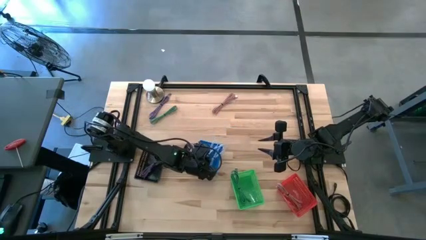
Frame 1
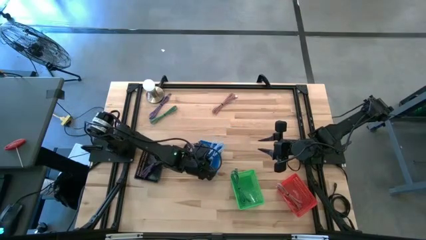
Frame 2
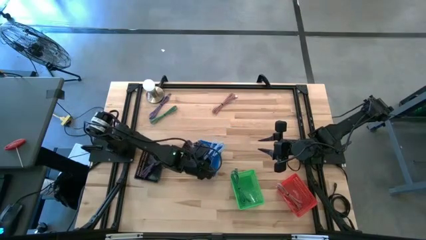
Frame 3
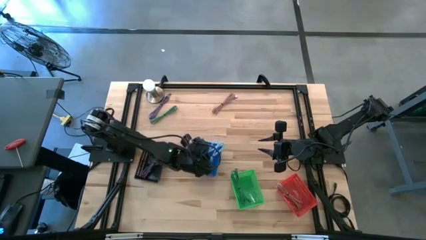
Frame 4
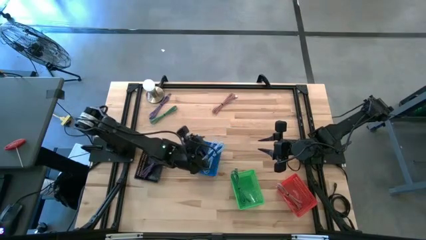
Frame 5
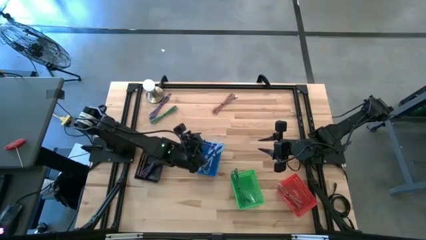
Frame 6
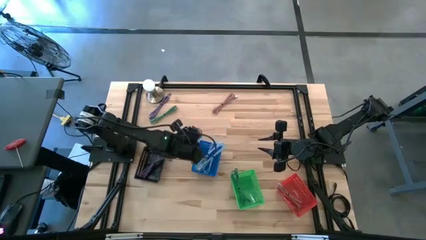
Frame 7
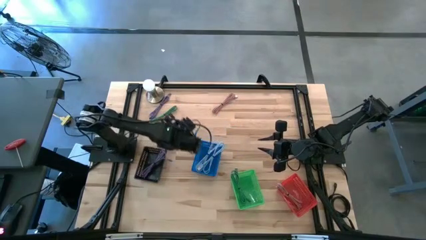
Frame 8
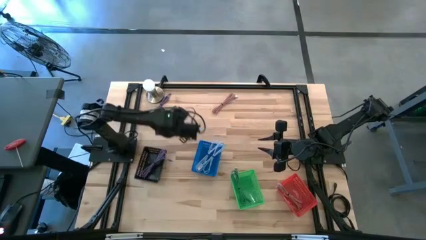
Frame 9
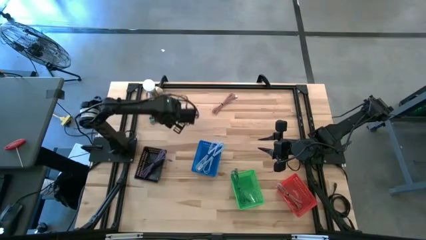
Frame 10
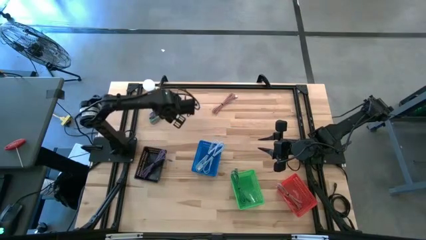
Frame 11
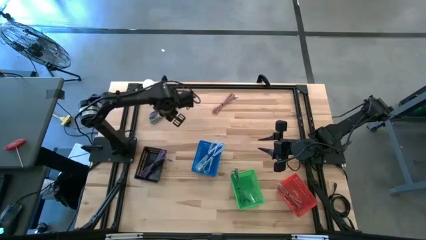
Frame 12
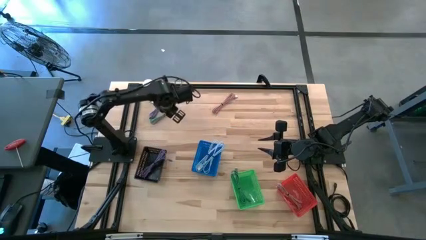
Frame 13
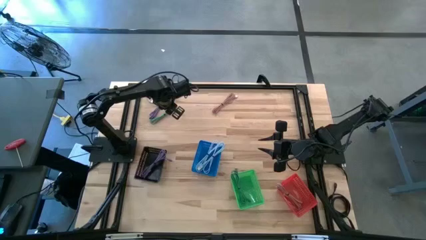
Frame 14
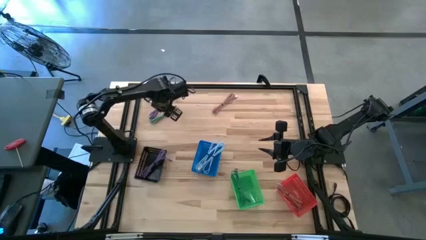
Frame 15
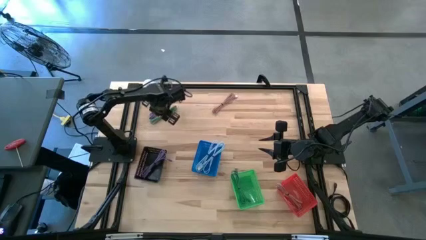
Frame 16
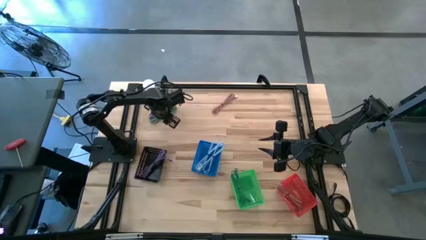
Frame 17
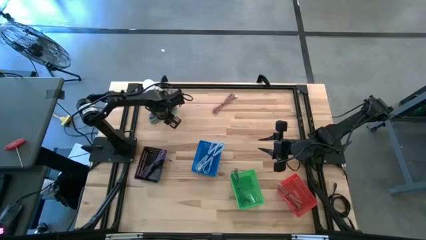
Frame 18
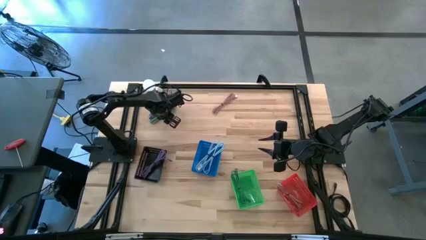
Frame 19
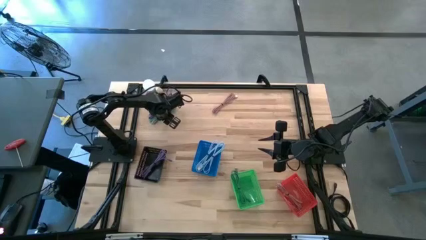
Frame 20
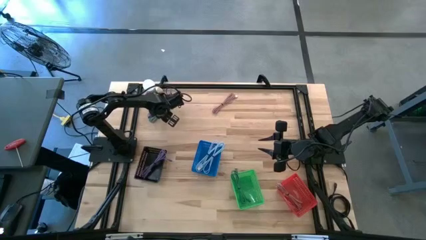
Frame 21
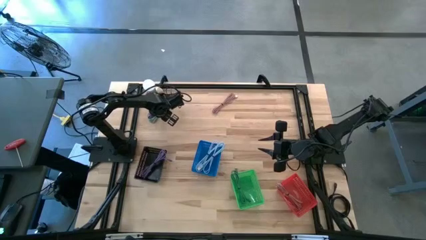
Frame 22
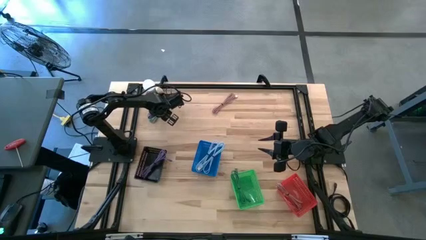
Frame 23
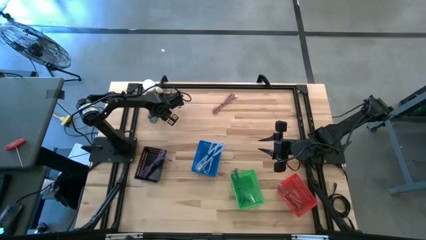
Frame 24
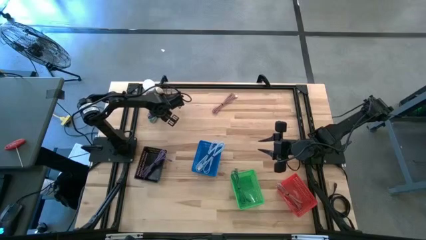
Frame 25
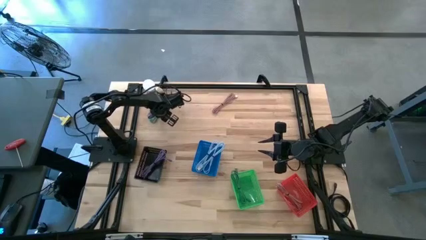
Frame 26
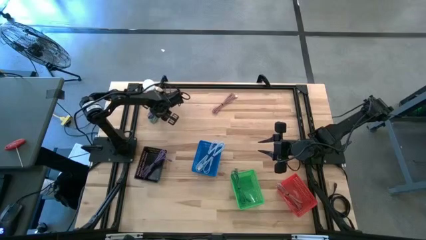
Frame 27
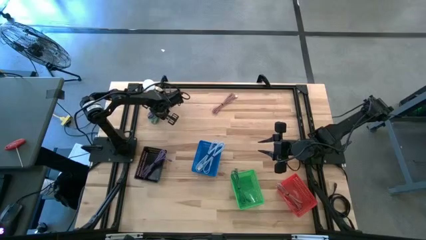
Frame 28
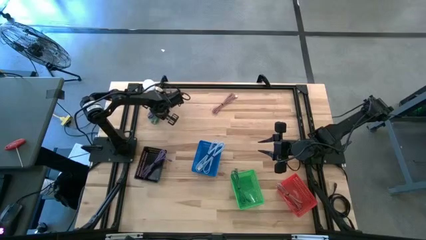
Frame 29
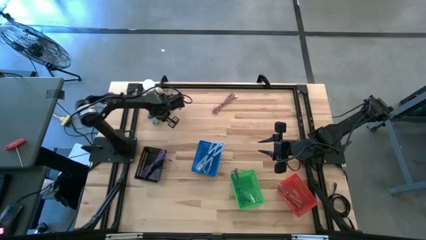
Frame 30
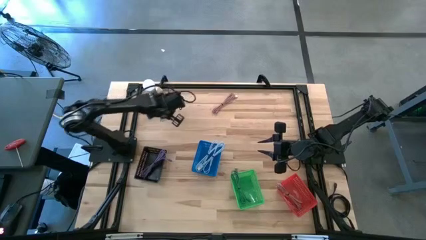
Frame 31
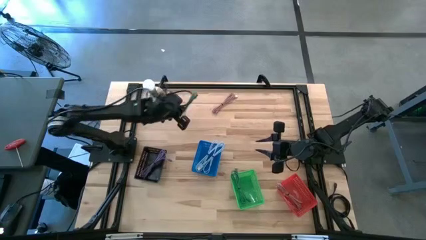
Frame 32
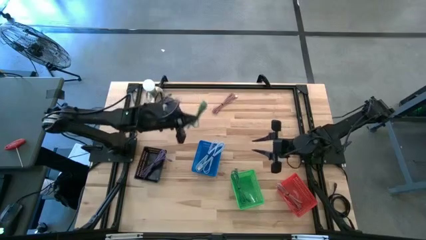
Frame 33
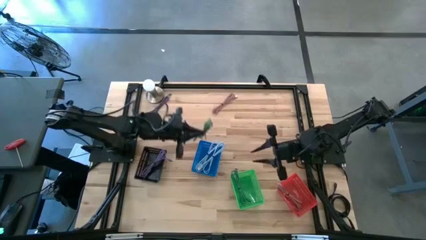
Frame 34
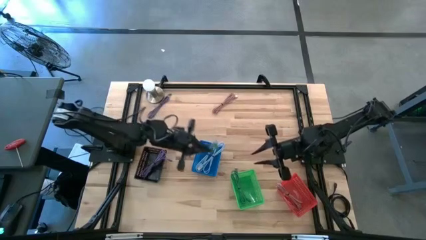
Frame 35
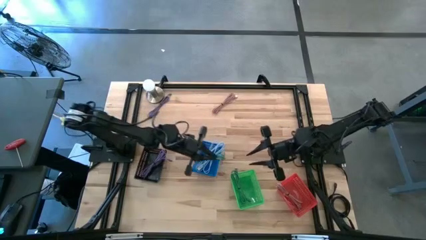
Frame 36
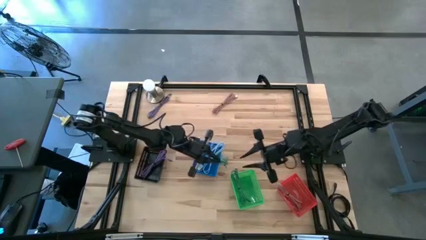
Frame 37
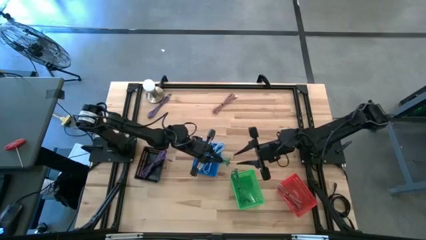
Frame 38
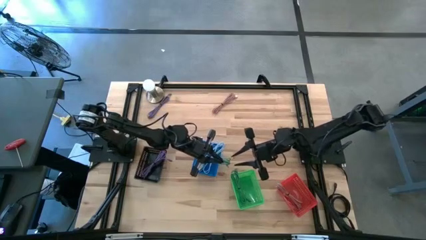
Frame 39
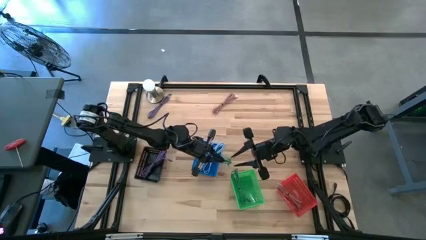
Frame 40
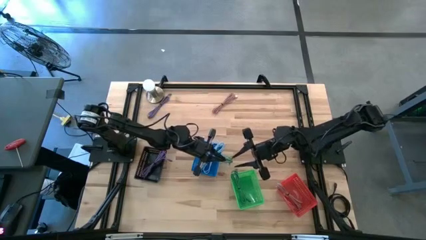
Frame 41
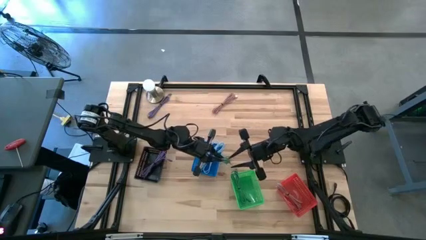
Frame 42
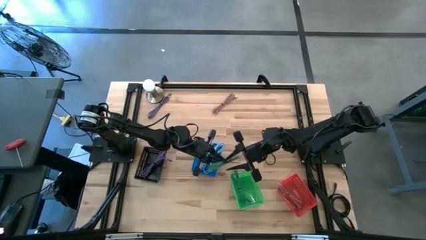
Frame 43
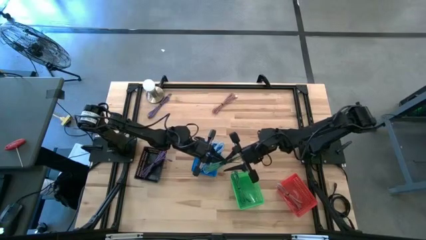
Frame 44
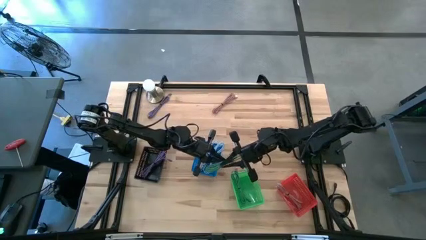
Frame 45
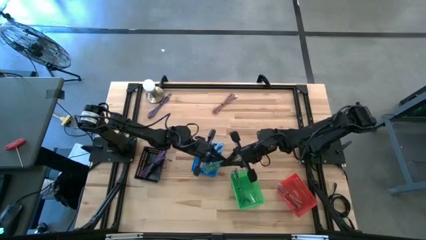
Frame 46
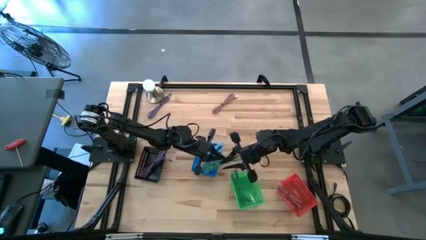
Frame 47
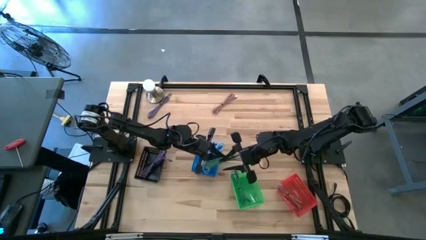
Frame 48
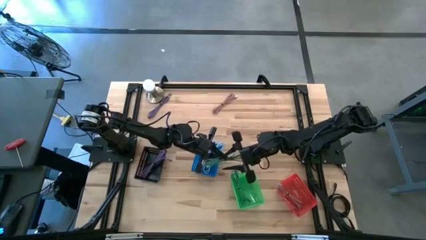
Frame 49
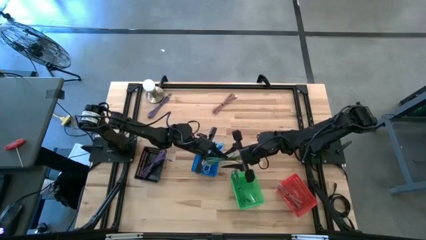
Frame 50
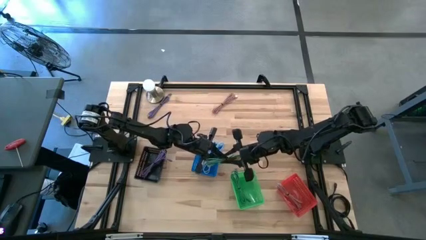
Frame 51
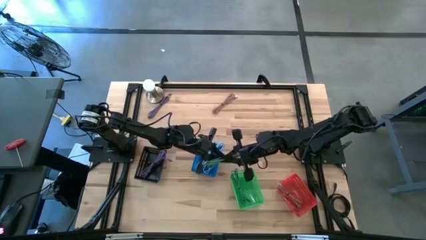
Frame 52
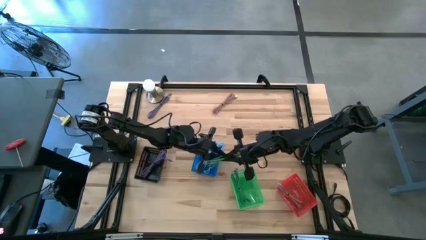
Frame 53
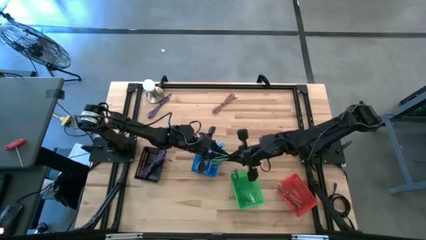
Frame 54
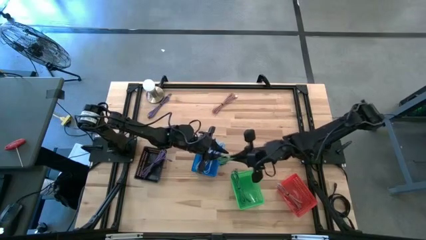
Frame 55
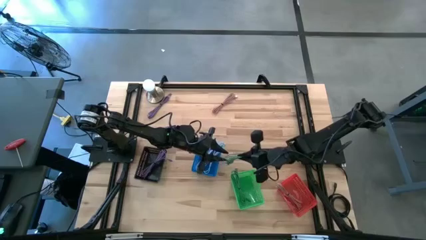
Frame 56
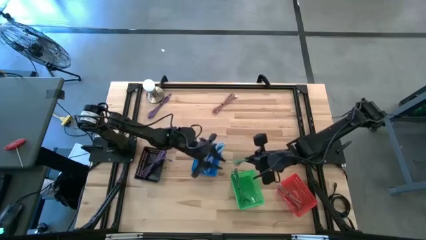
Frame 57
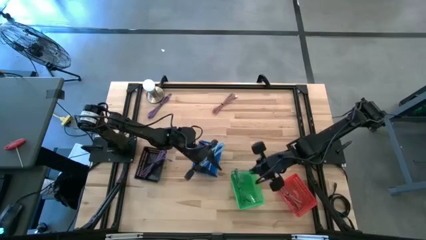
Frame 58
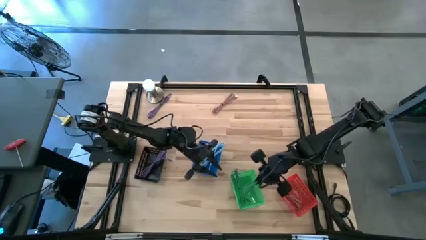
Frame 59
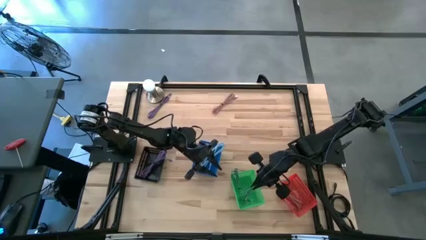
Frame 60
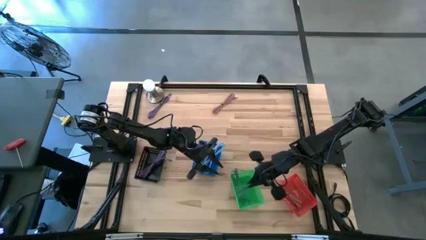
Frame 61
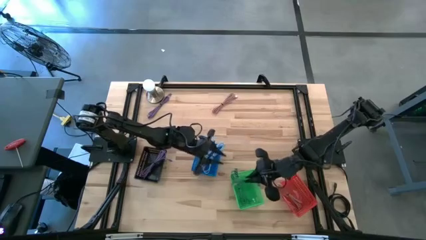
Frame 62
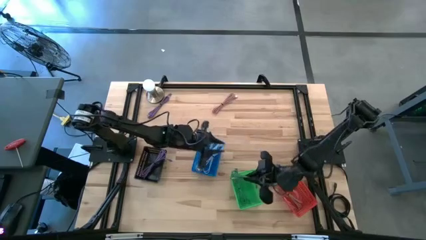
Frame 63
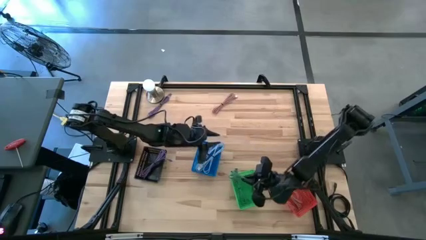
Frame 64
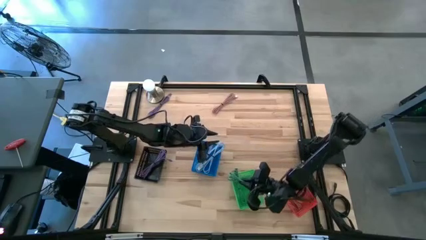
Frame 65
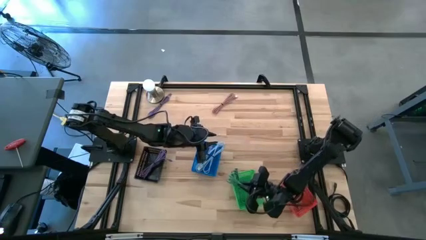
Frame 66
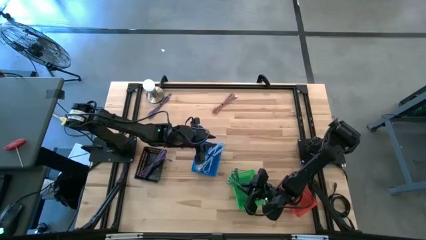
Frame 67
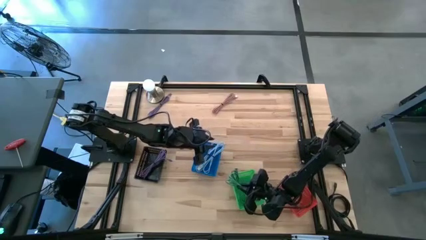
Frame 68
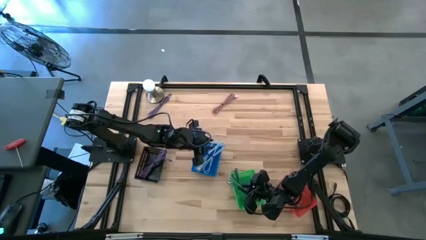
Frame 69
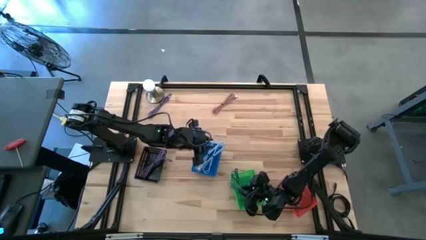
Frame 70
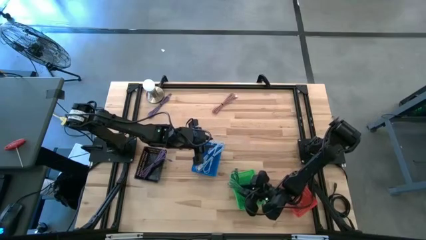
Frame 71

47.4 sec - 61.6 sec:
Task: Pick & Place USB Port
Put the green USB cable into the green bin
